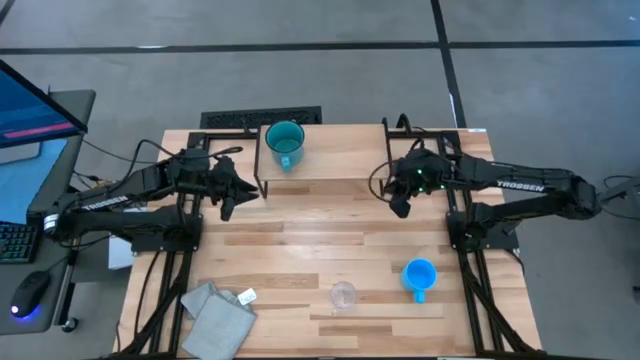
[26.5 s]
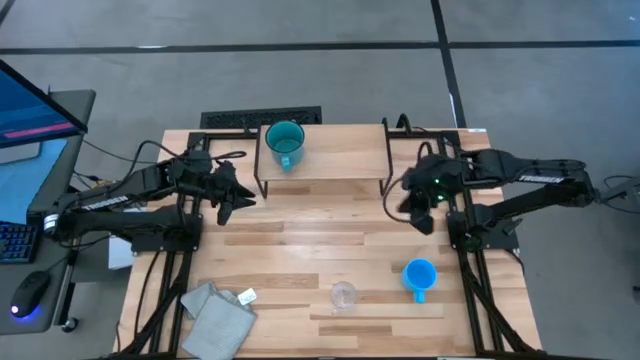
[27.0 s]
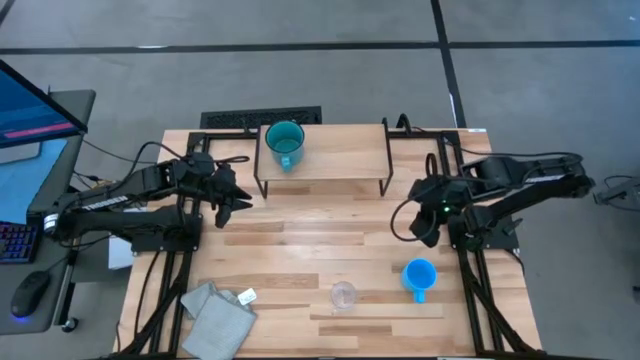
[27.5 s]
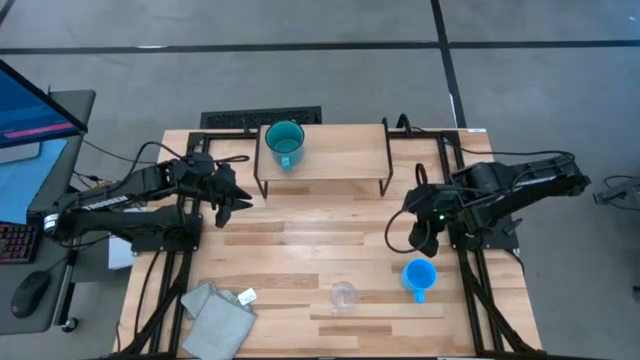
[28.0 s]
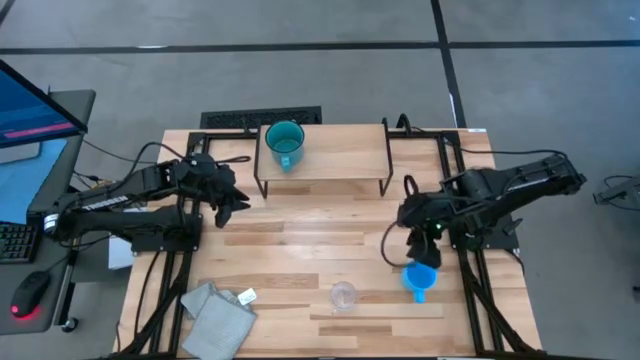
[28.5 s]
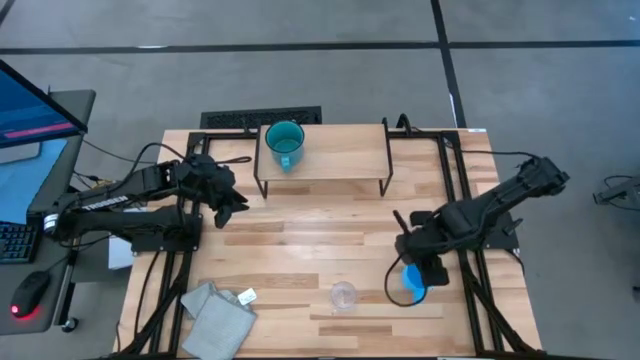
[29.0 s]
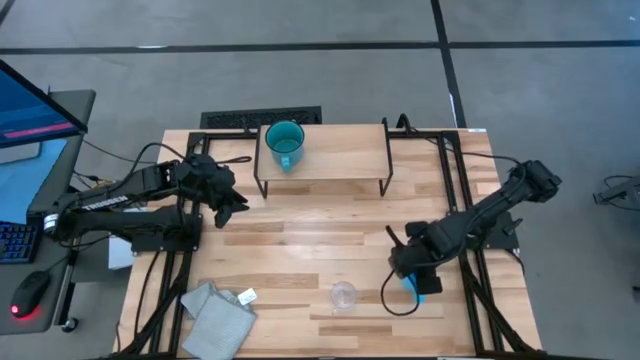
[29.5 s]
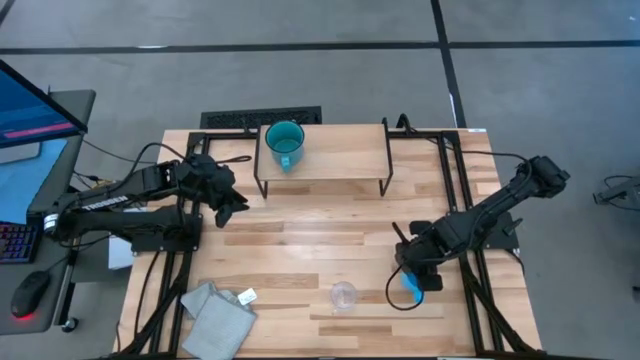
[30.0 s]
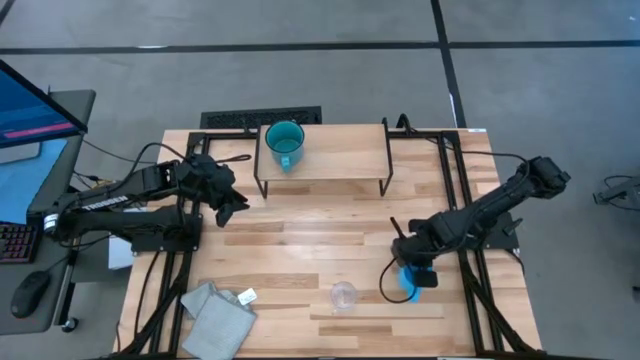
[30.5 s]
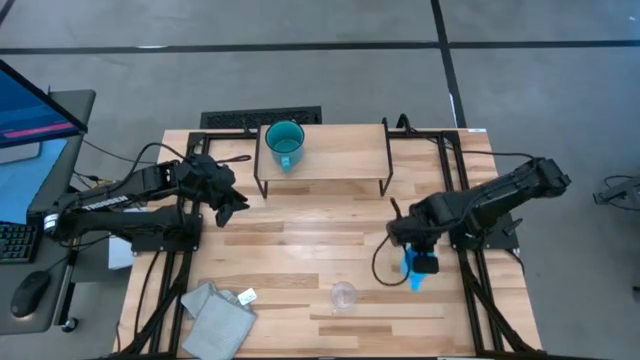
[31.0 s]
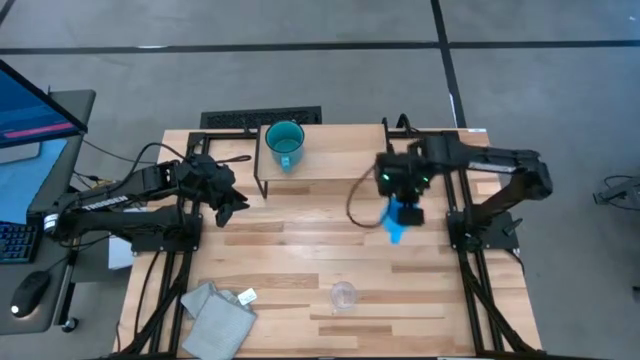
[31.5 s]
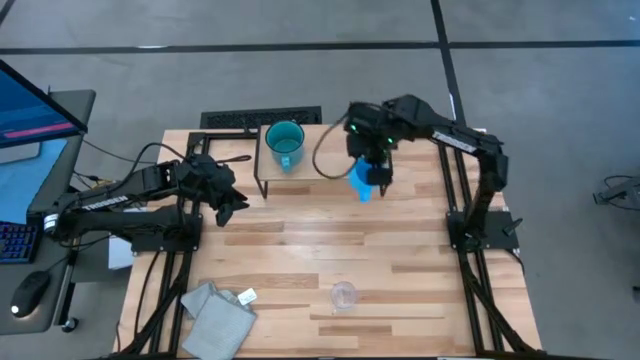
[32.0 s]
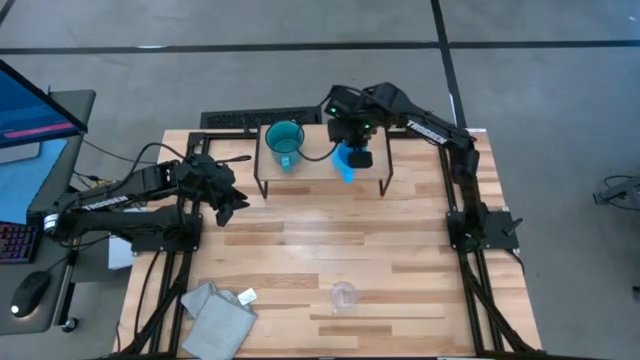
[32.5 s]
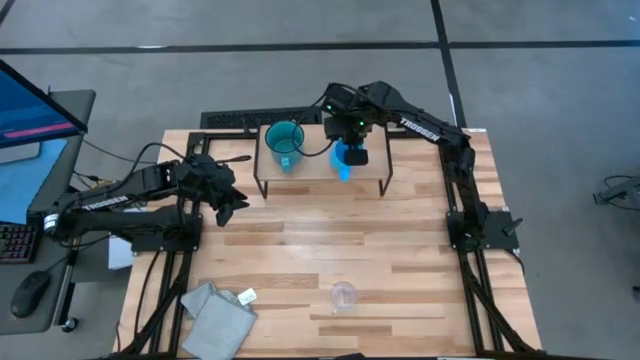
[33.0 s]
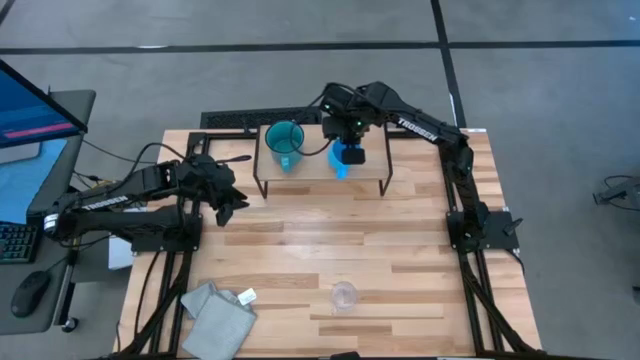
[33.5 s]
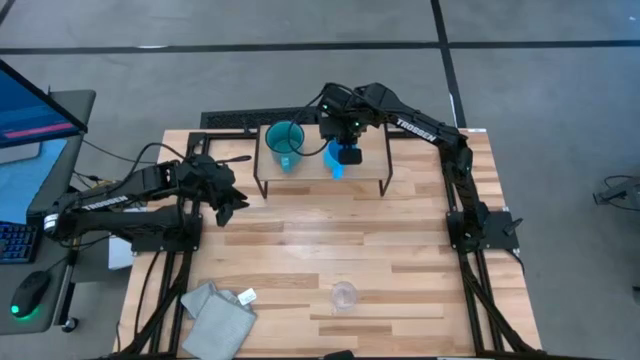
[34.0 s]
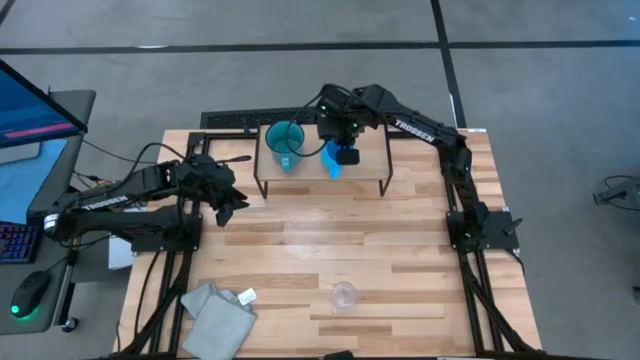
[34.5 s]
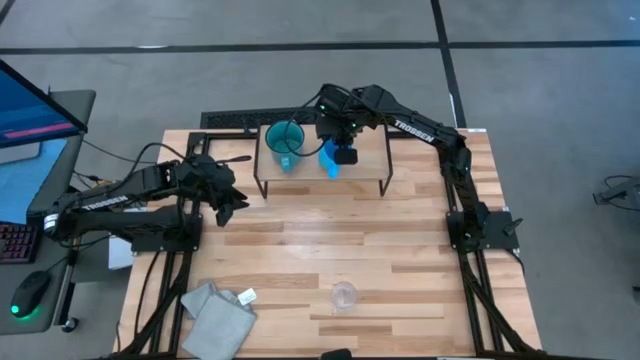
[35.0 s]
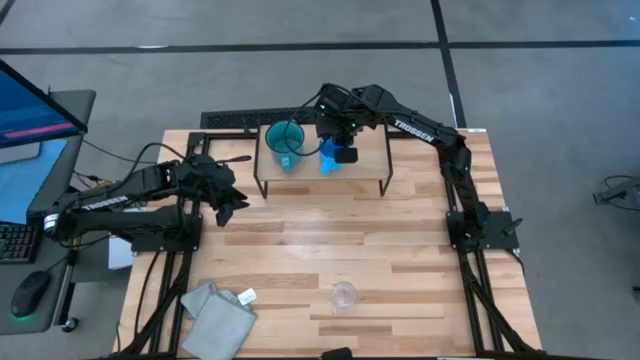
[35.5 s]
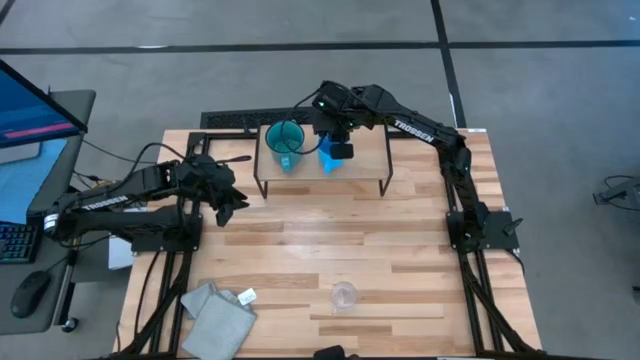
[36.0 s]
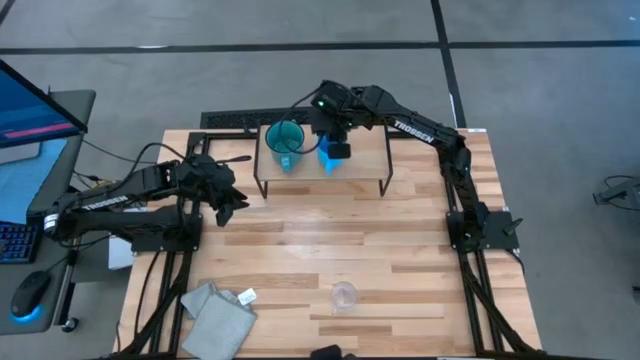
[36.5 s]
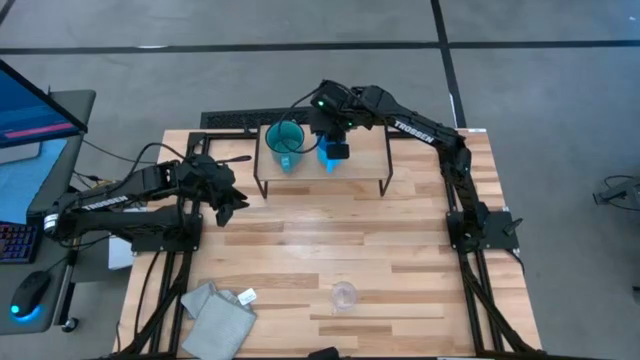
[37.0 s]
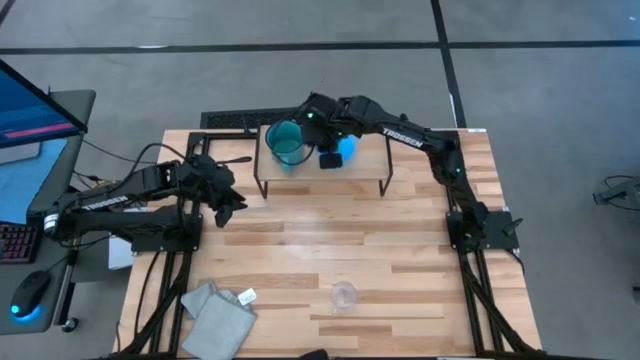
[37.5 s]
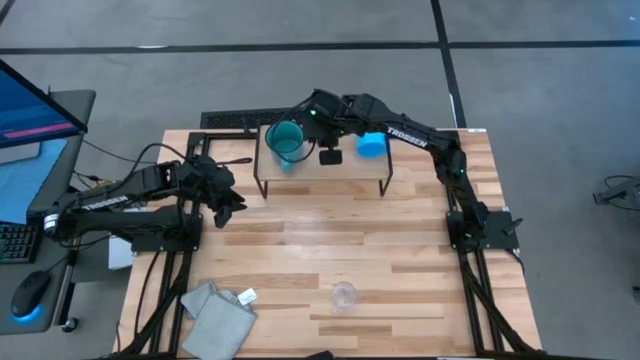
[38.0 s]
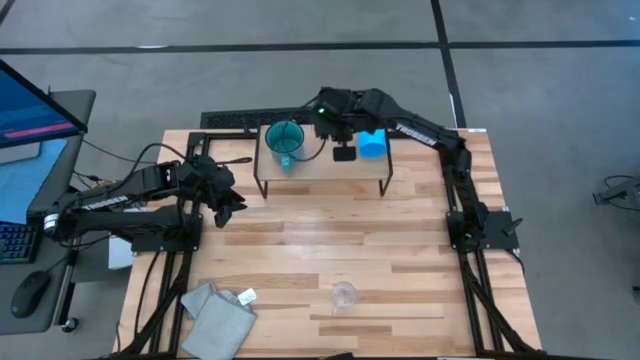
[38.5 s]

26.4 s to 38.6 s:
Task: Stack small to large cups/mugs on shelf
Put the blue mug on the shelf

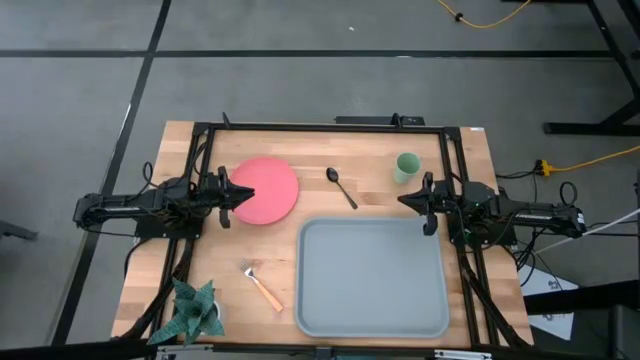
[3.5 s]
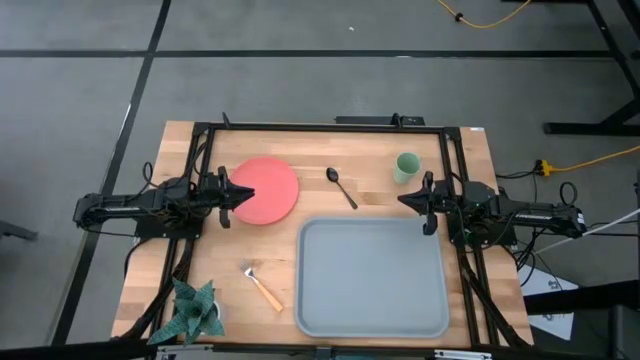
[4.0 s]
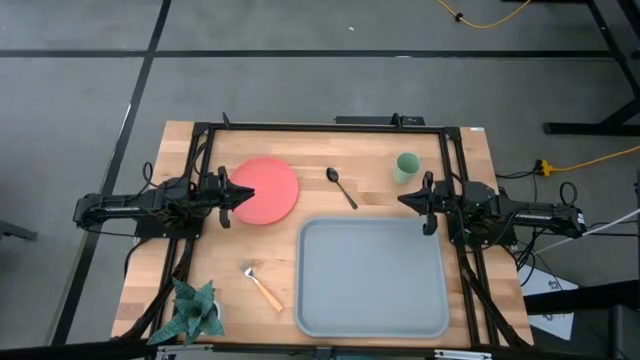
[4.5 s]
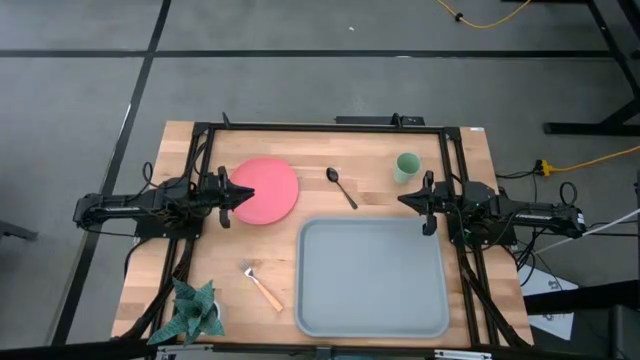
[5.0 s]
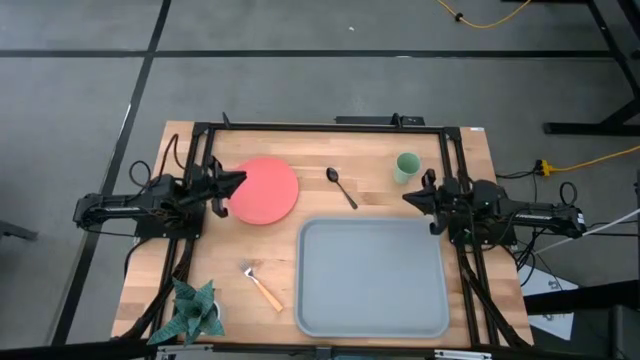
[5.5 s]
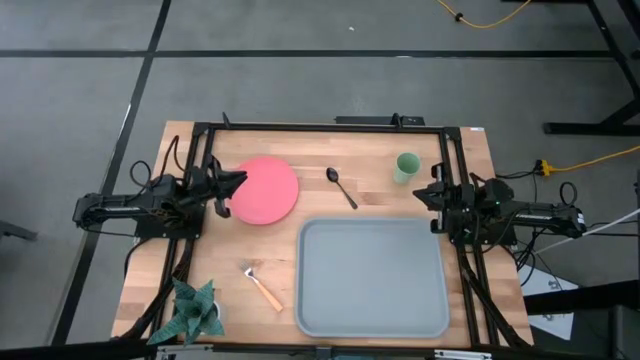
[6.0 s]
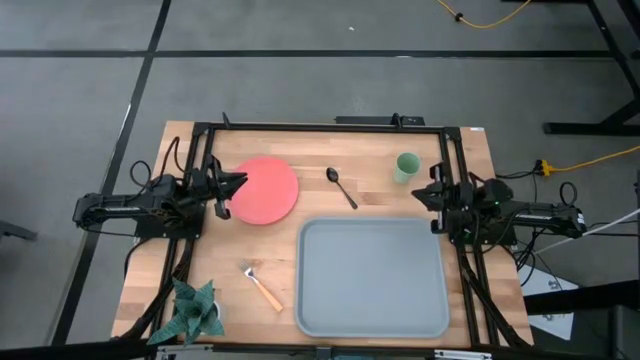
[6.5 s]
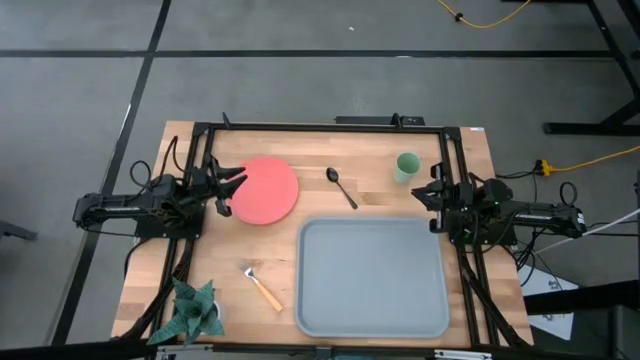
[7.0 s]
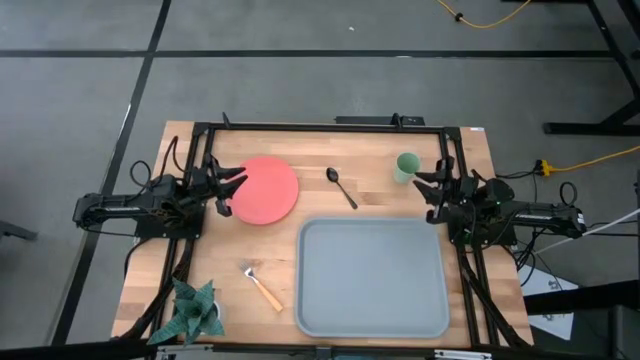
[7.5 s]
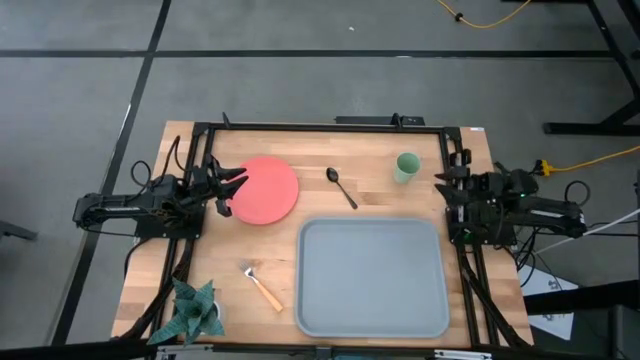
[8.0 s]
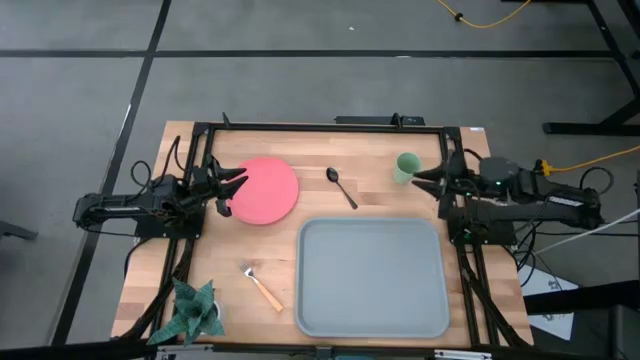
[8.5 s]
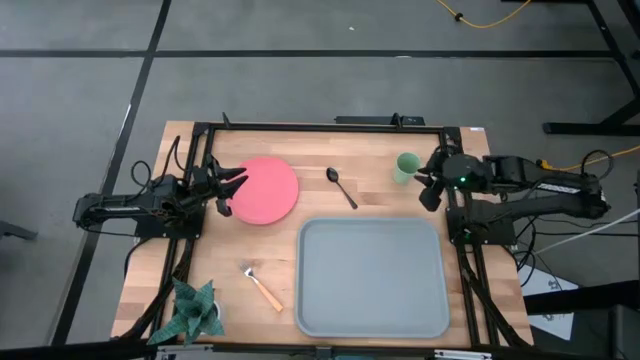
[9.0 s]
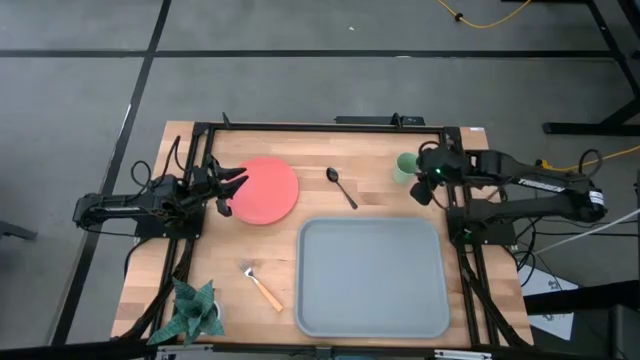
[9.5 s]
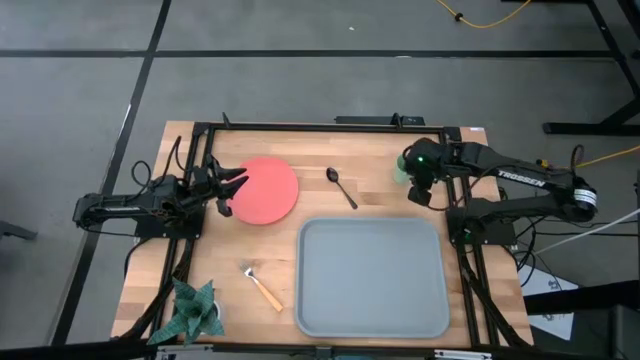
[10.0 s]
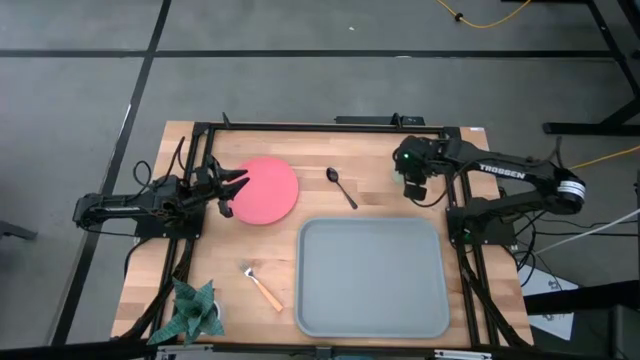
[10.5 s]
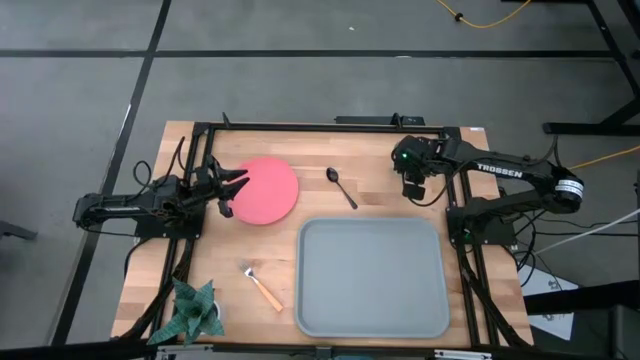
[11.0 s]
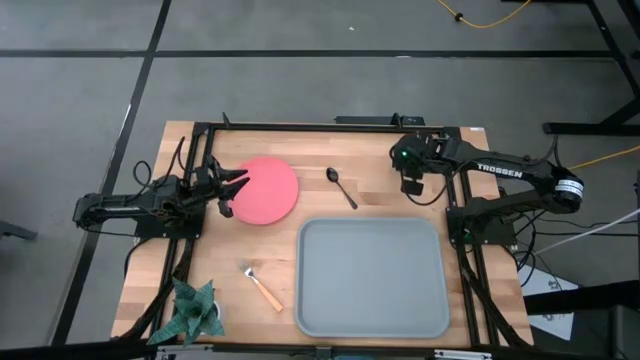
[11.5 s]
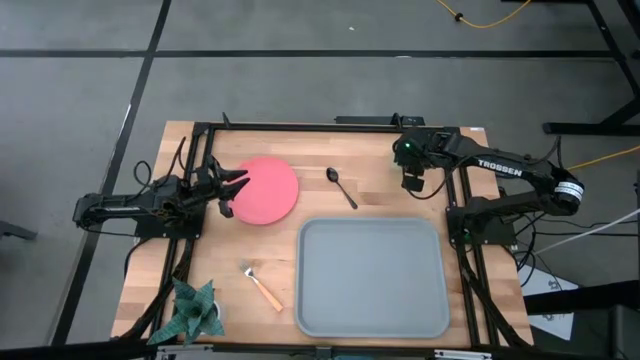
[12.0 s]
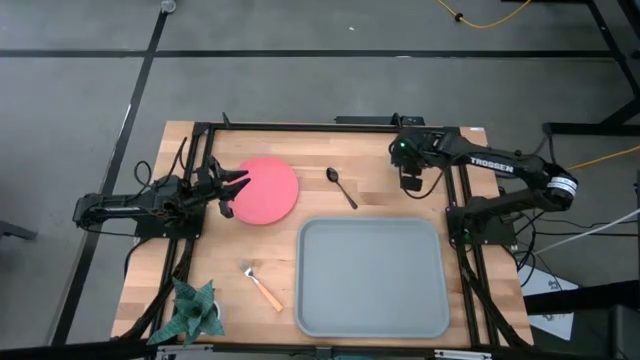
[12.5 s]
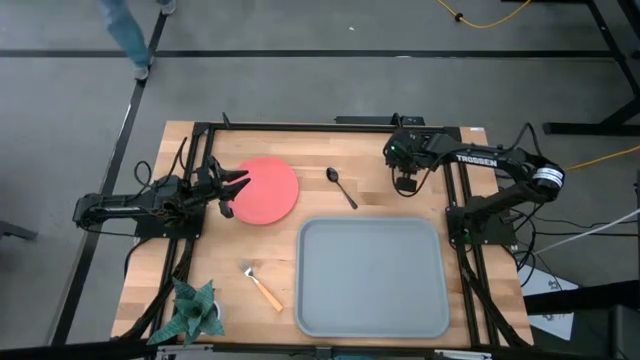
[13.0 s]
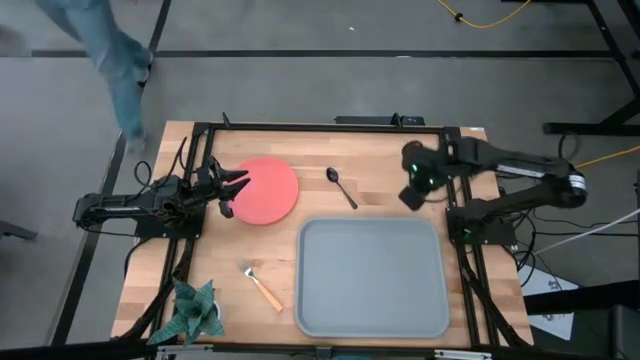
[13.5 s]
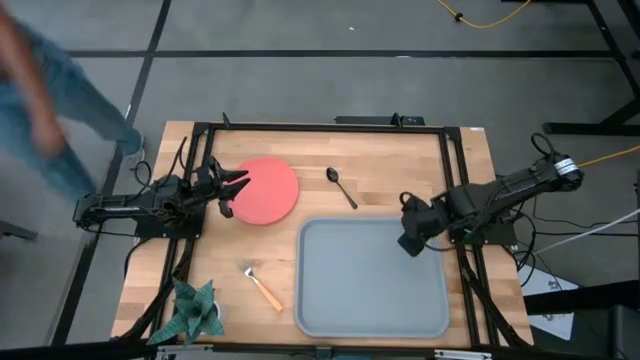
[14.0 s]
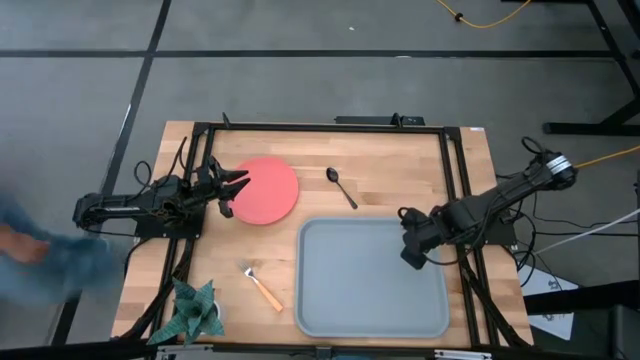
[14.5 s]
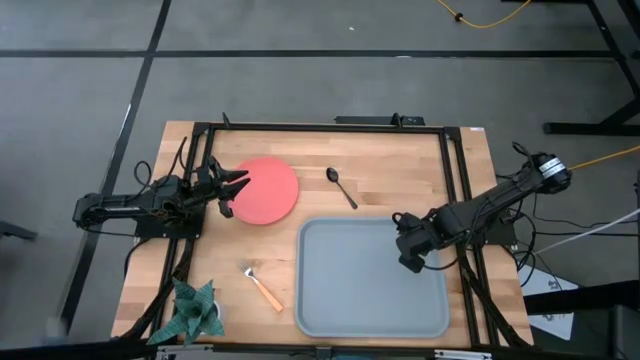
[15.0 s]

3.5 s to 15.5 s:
Task: Pick and place plate/cup/fork/spoon on tray
Put the light green cup on the light blue tray
